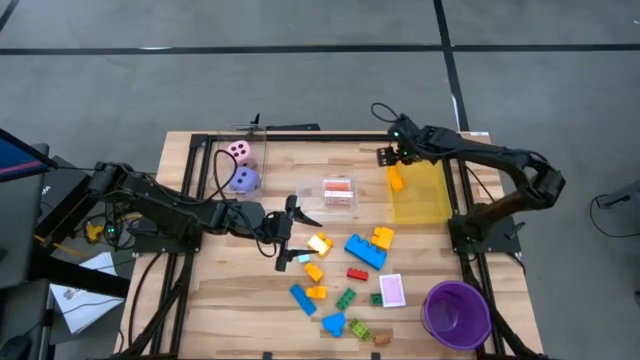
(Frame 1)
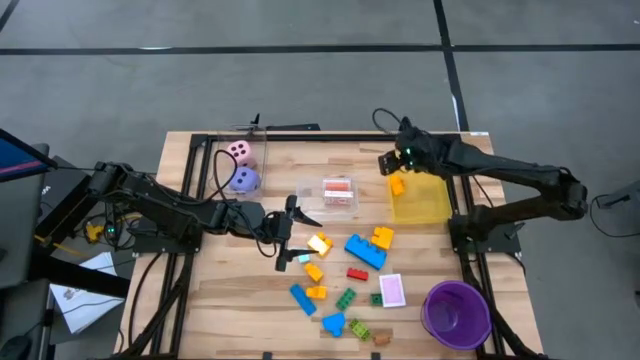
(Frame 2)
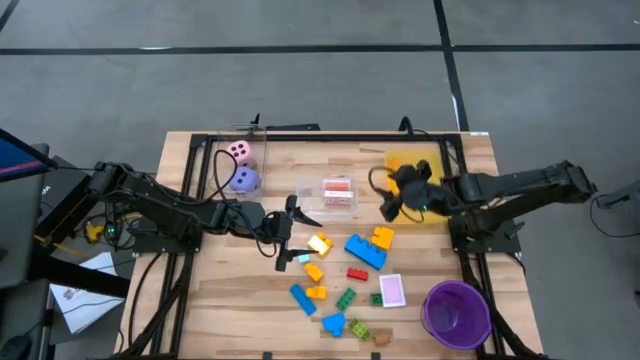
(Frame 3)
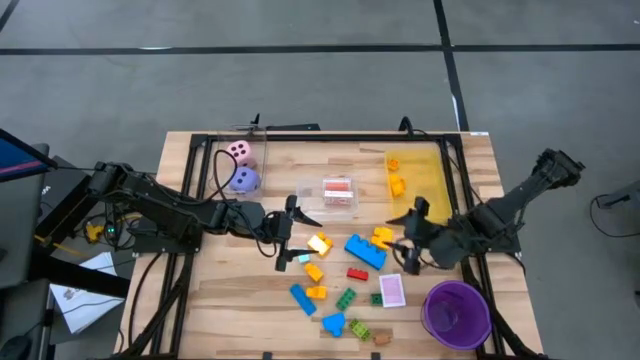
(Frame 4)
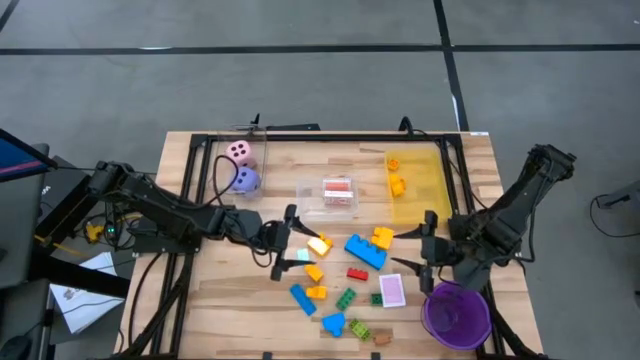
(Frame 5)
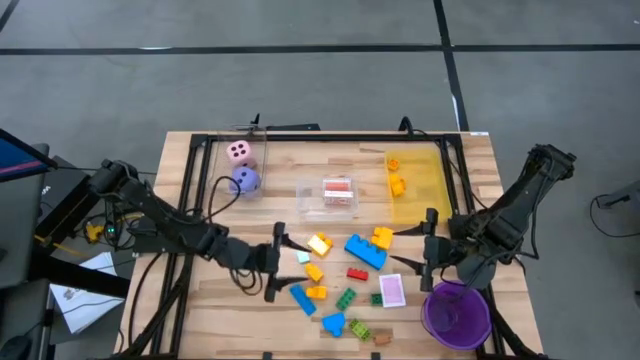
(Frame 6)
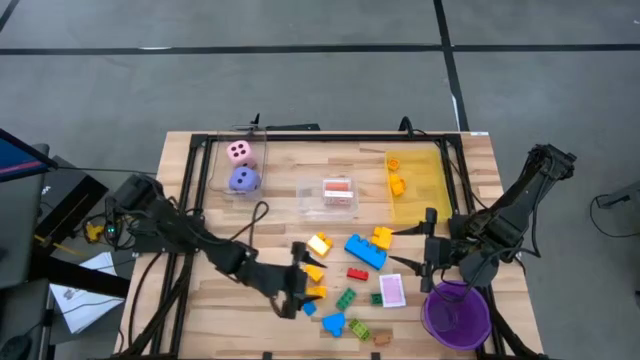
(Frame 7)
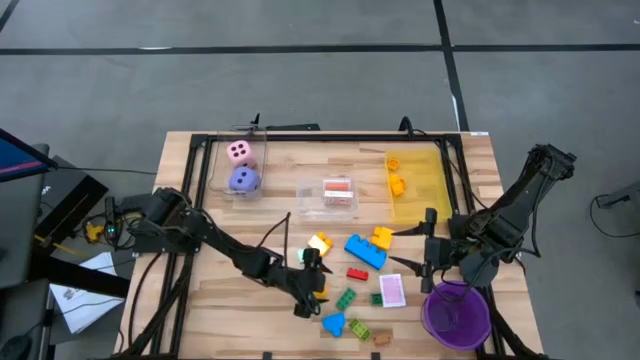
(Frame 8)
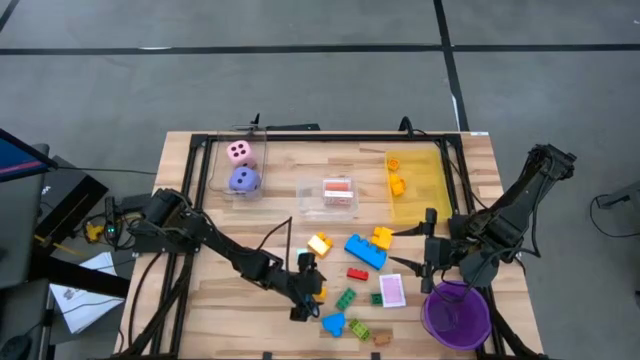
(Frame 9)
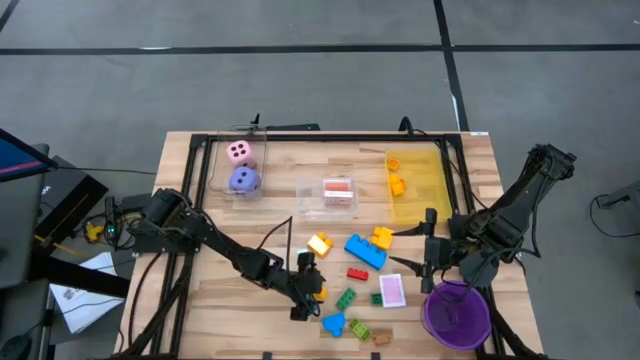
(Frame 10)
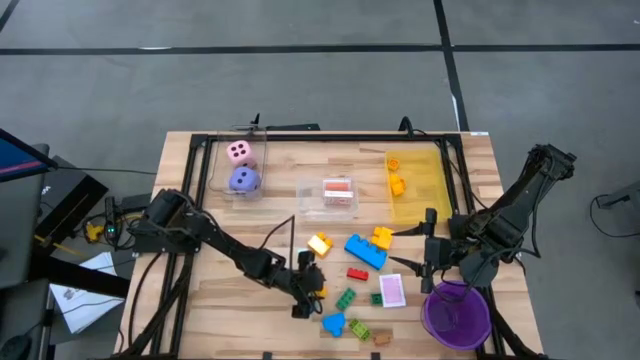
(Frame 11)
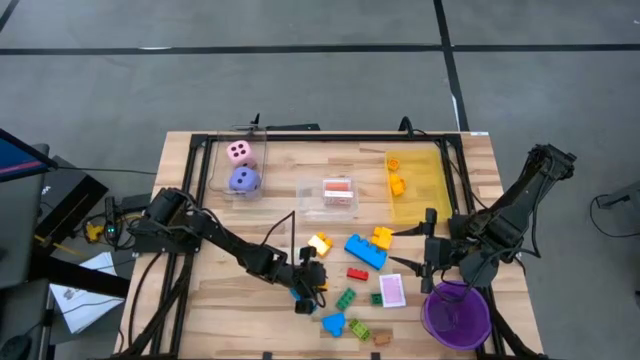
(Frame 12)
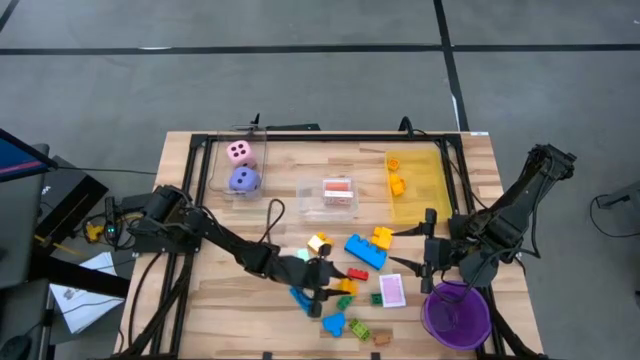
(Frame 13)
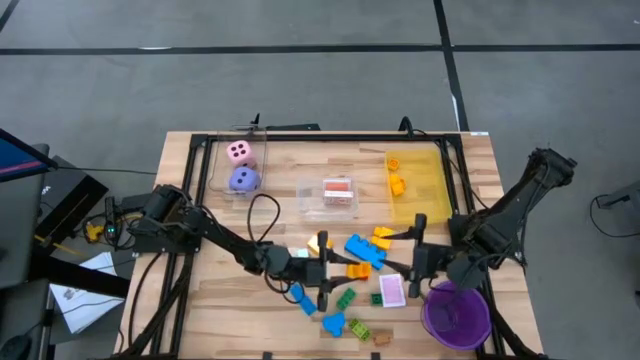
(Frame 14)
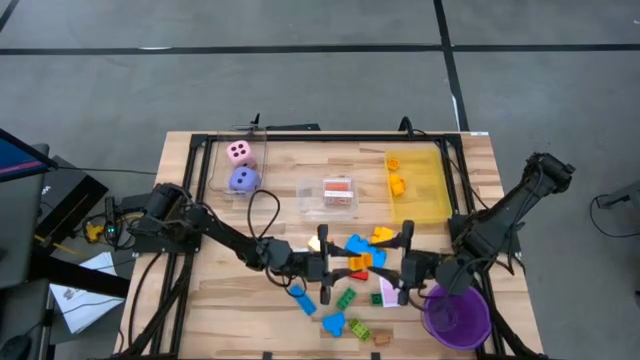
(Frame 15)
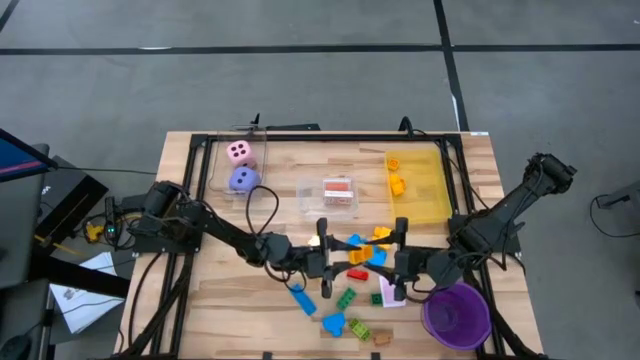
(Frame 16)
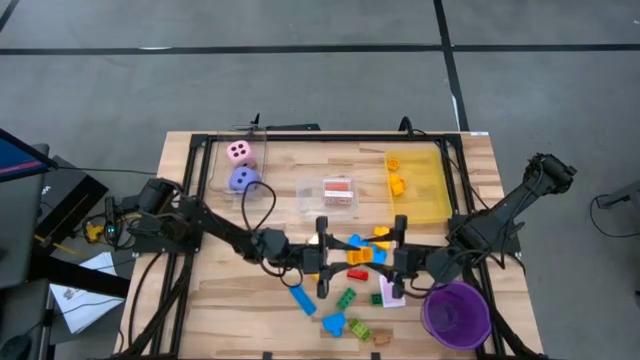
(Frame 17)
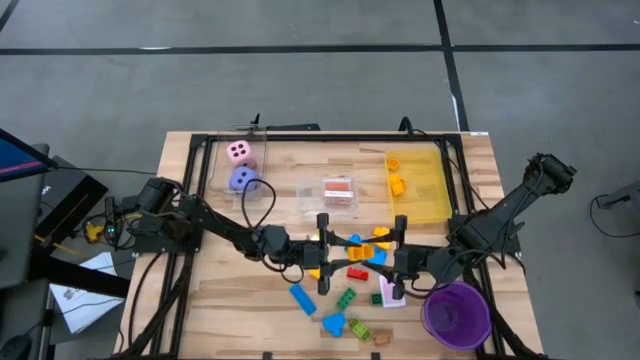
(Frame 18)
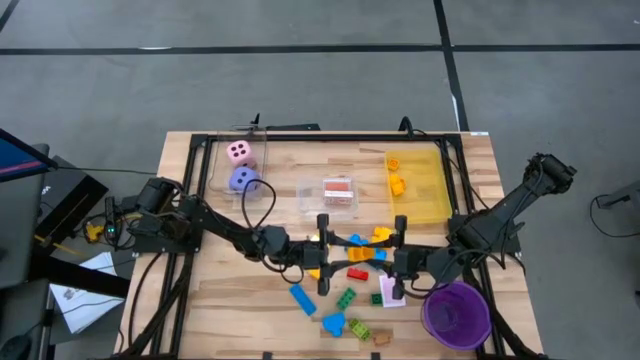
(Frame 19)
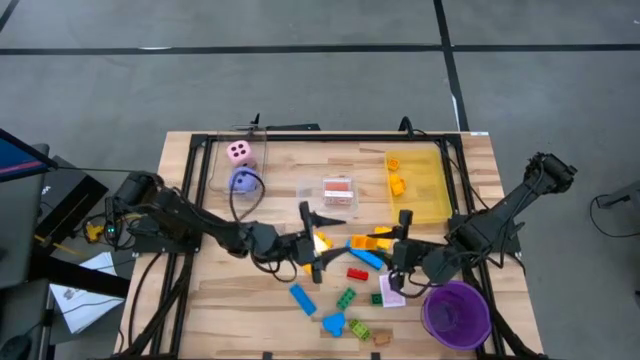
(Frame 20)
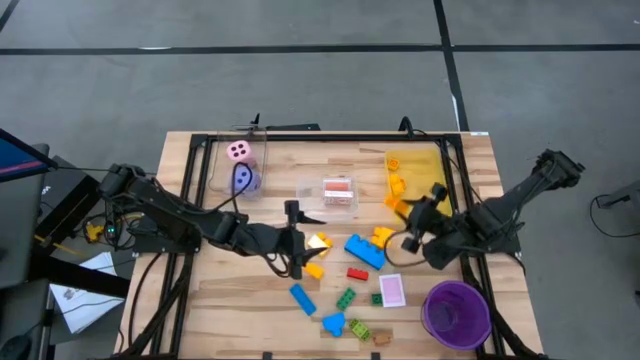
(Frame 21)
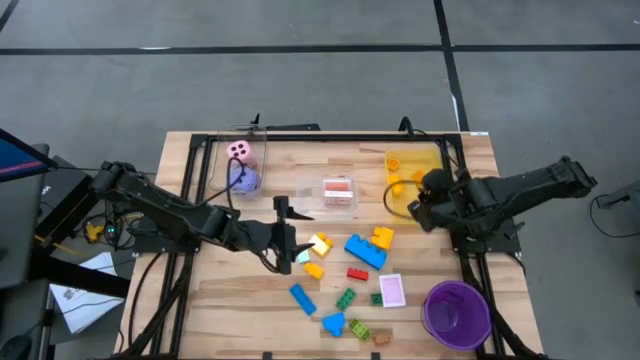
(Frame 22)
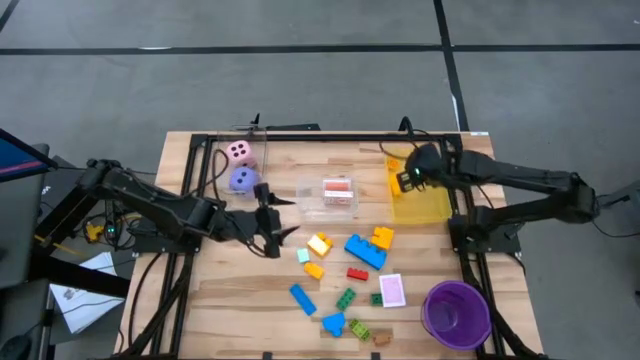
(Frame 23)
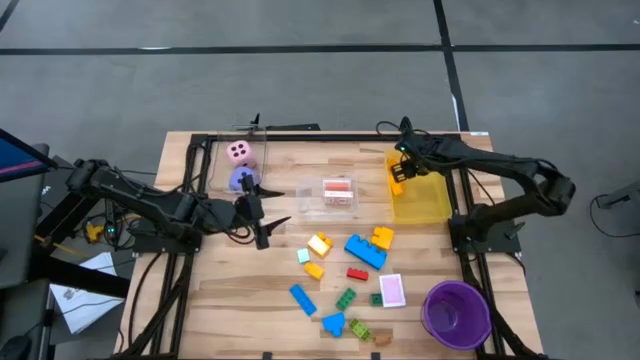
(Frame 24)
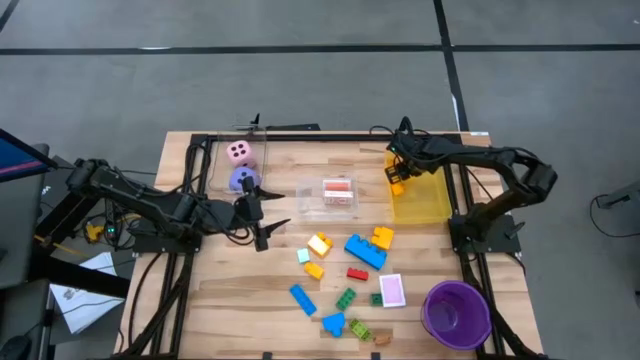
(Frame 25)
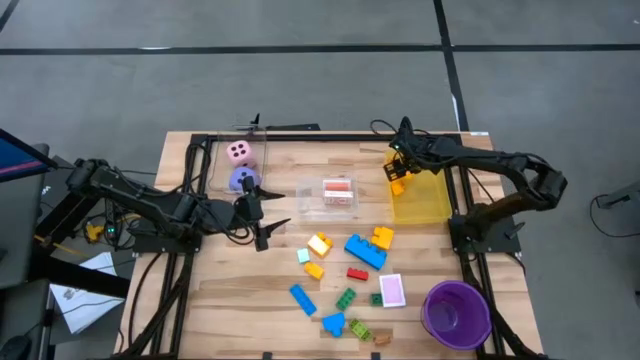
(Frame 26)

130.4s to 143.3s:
Task: Pick & Place Toys
Put the yellow game piece into the yellow bin

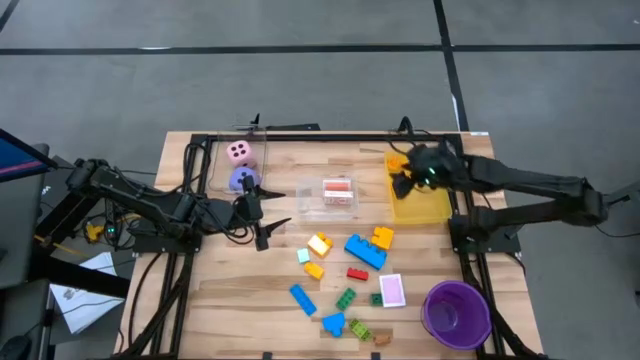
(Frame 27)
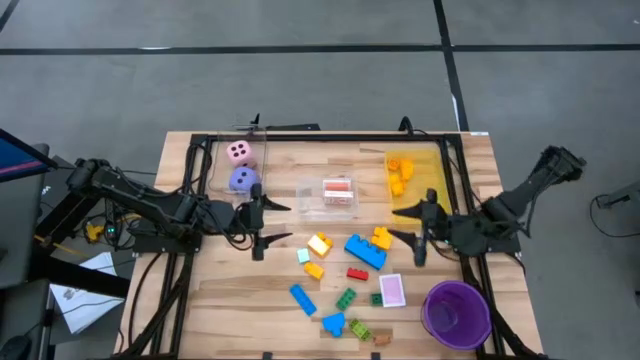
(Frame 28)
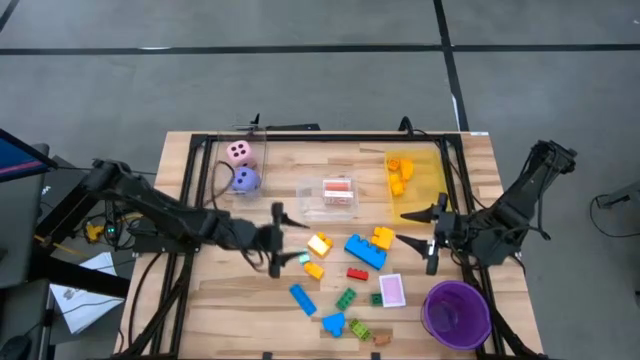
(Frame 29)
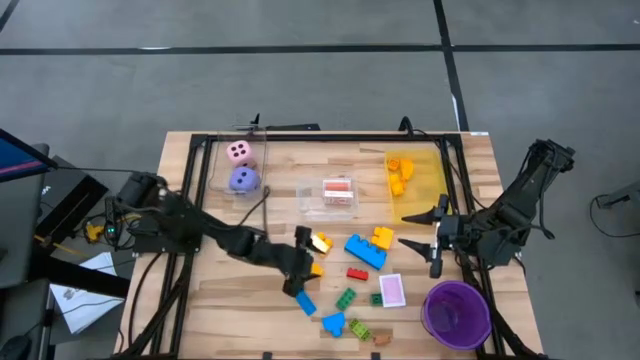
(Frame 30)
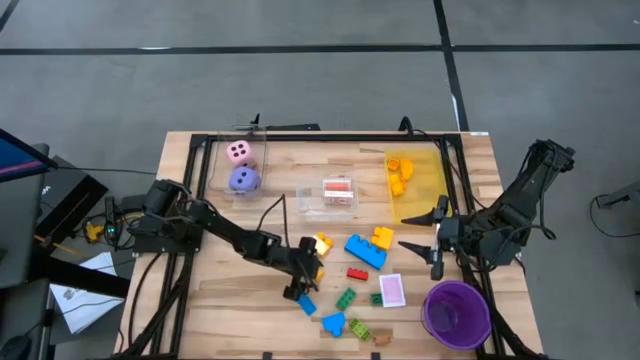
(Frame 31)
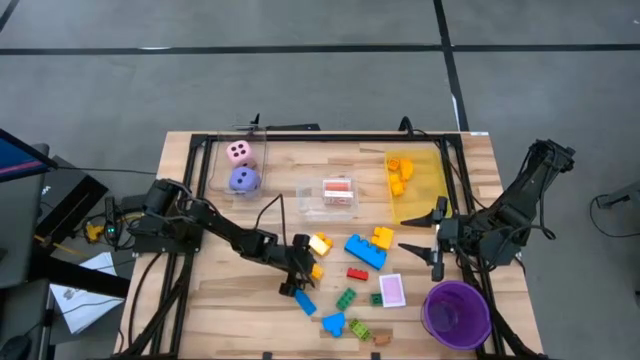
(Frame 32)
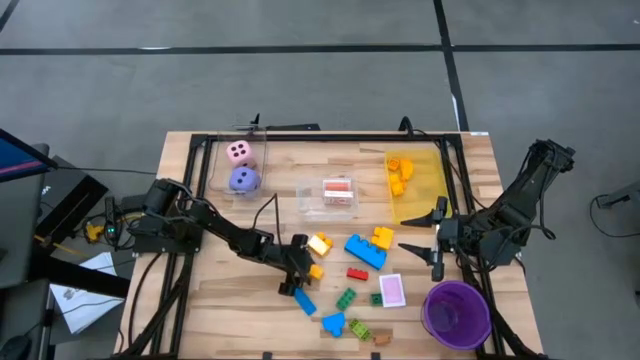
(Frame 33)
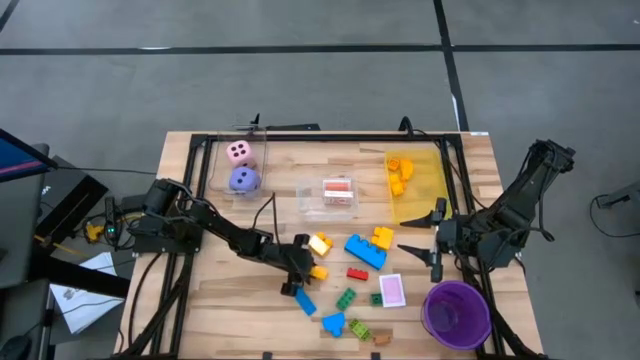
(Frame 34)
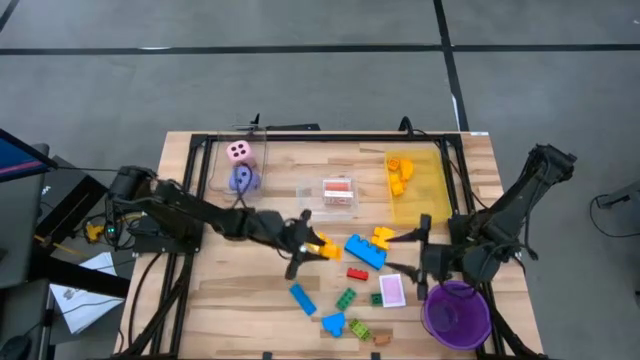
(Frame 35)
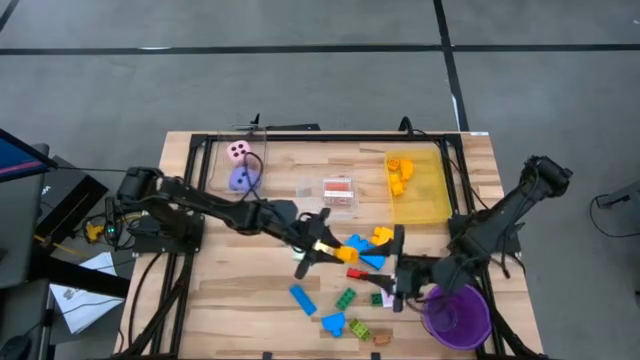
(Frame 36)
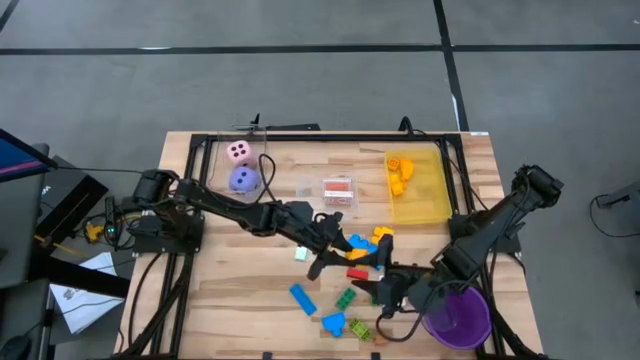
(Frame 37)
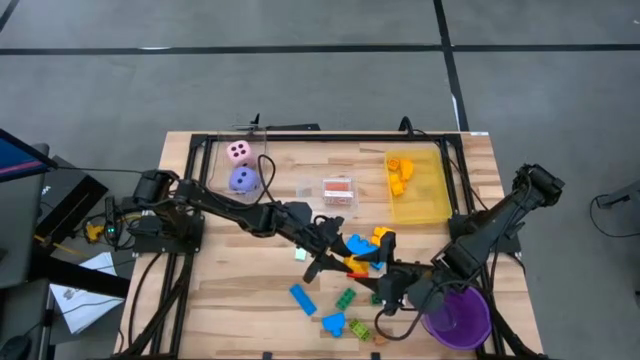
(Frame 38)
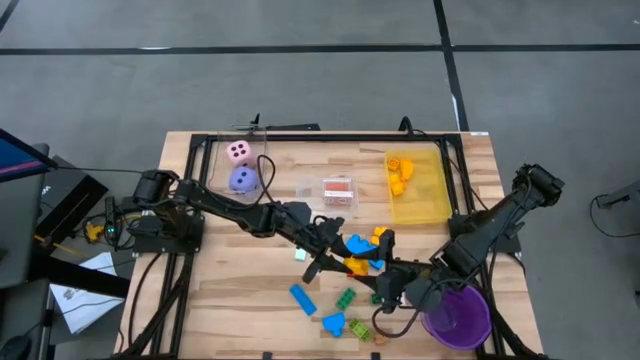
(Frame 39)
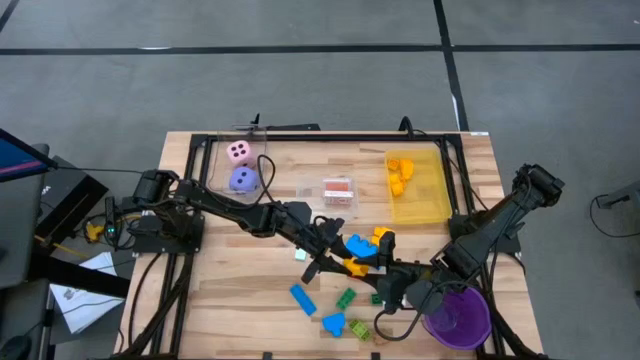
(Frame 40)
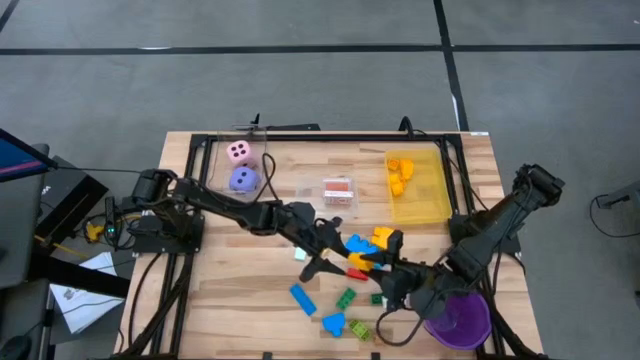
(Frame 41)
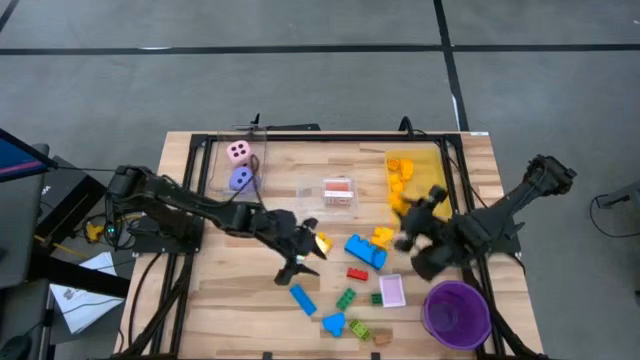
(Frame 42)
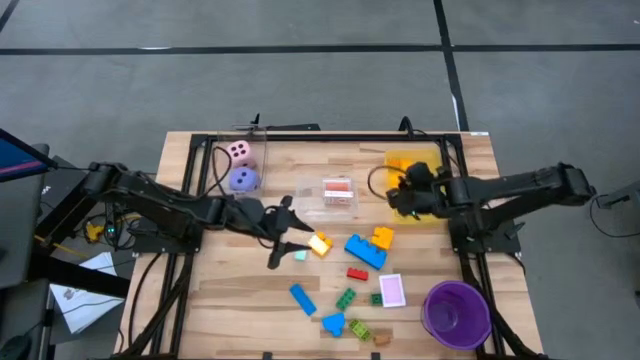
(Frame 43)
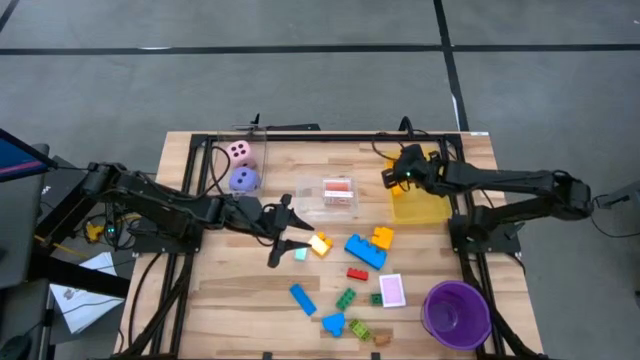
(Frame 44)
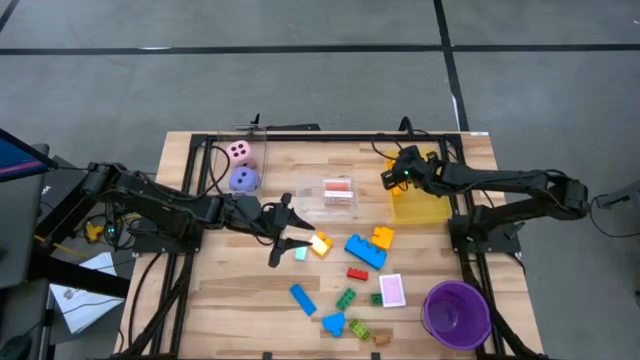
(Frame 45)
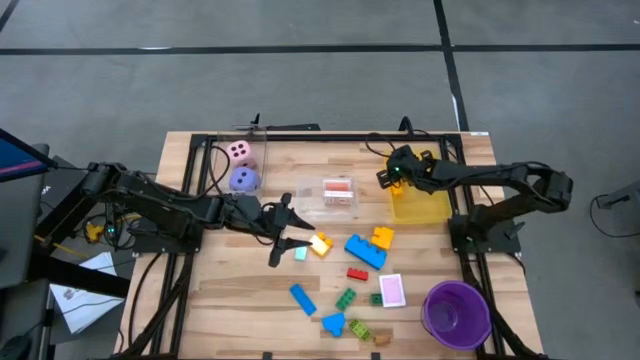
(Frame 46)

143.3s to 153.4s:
Put the yellow game piece into the yellow bin
